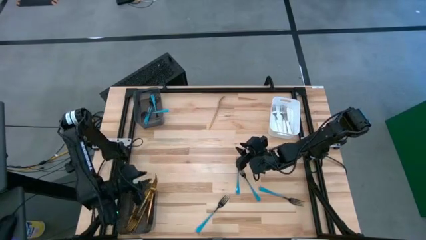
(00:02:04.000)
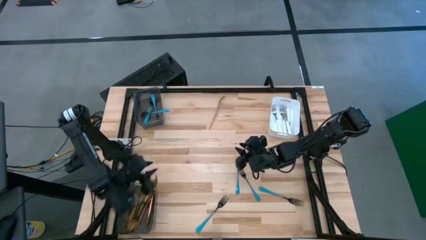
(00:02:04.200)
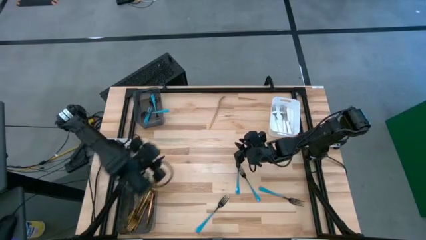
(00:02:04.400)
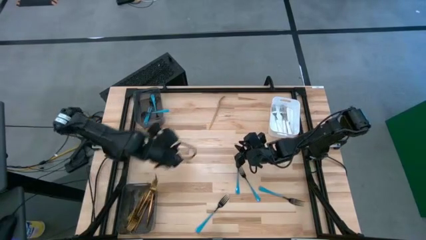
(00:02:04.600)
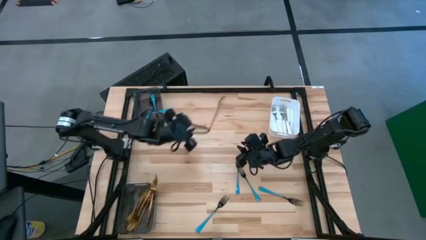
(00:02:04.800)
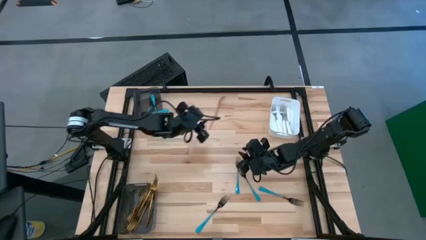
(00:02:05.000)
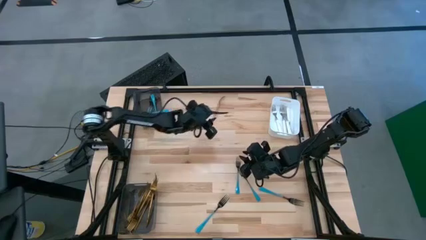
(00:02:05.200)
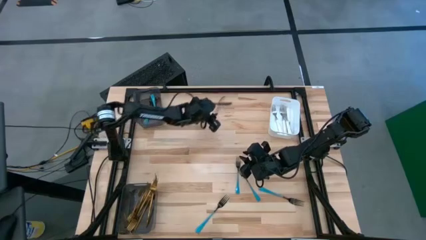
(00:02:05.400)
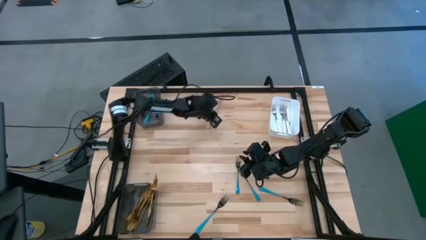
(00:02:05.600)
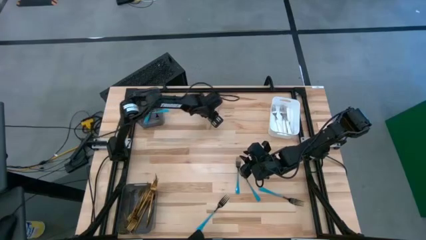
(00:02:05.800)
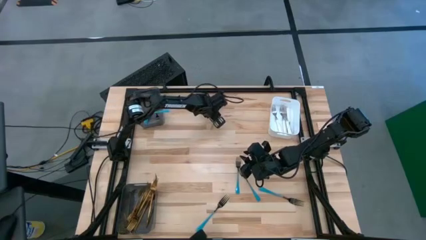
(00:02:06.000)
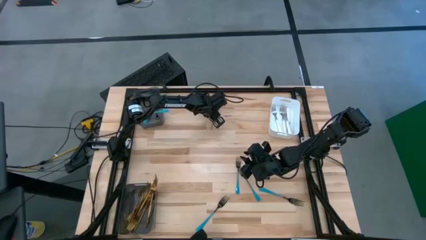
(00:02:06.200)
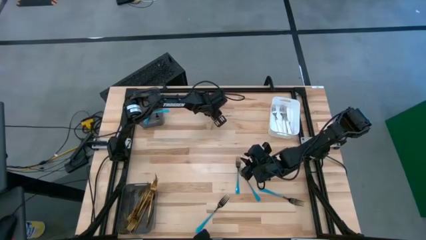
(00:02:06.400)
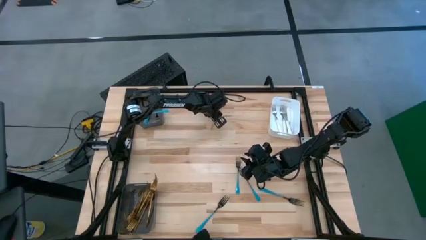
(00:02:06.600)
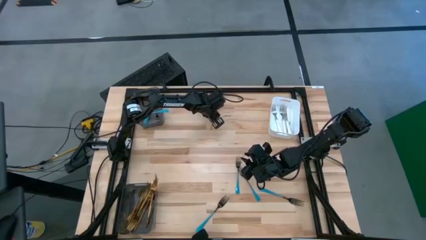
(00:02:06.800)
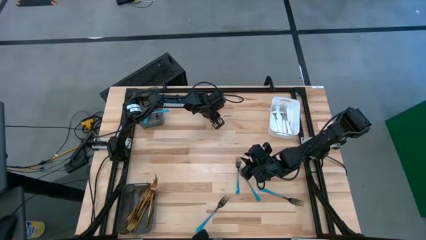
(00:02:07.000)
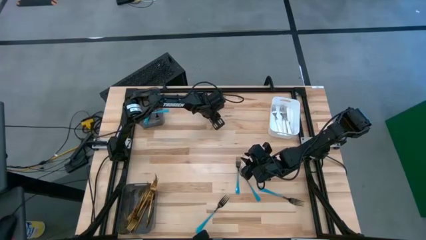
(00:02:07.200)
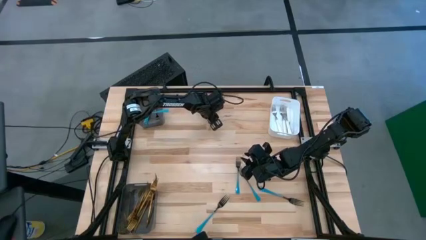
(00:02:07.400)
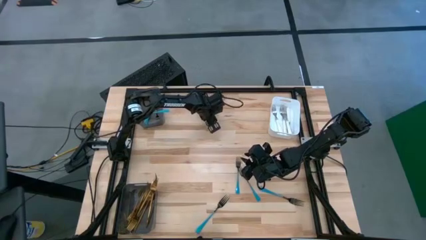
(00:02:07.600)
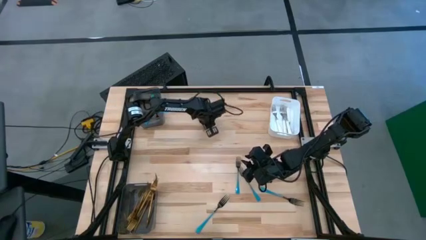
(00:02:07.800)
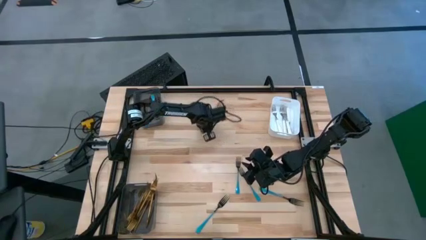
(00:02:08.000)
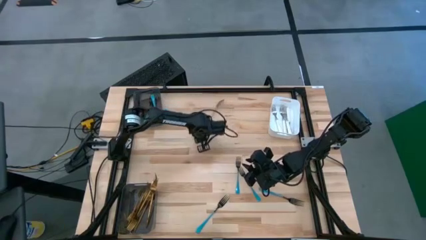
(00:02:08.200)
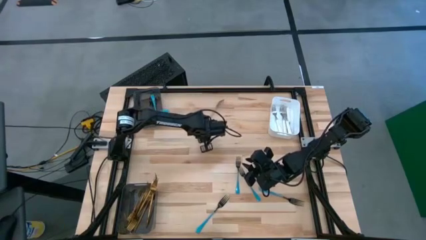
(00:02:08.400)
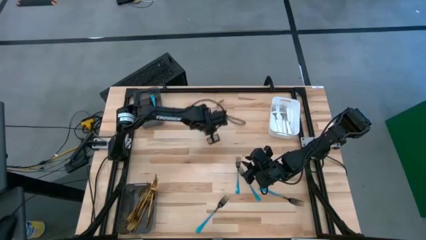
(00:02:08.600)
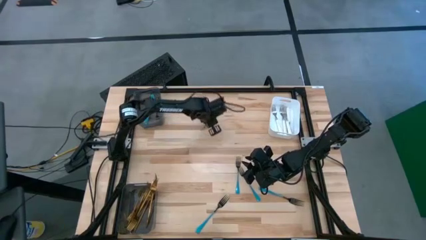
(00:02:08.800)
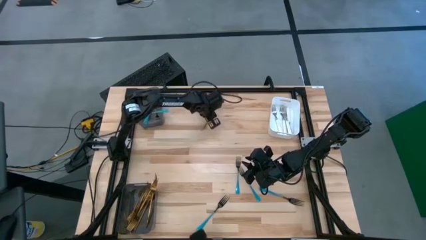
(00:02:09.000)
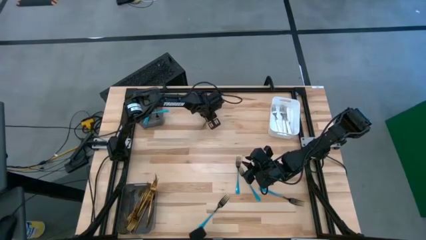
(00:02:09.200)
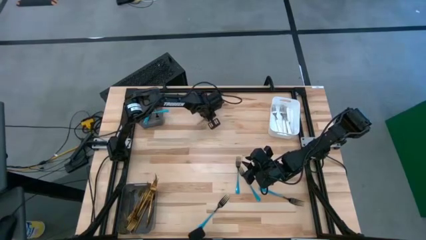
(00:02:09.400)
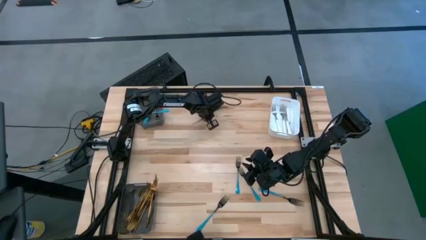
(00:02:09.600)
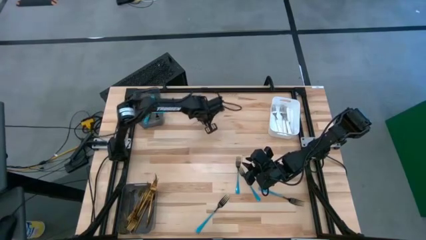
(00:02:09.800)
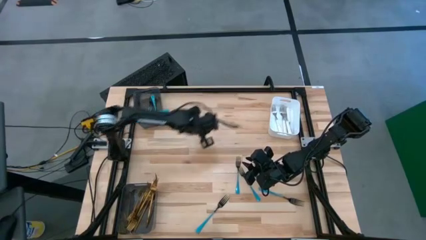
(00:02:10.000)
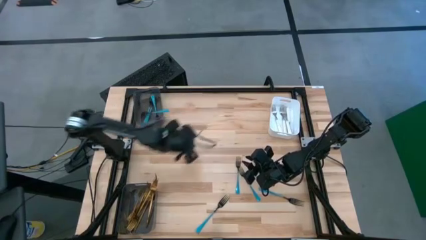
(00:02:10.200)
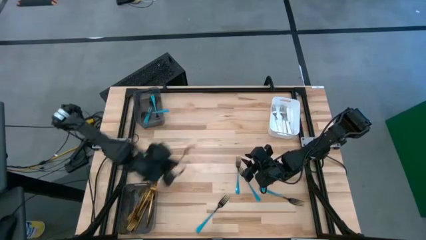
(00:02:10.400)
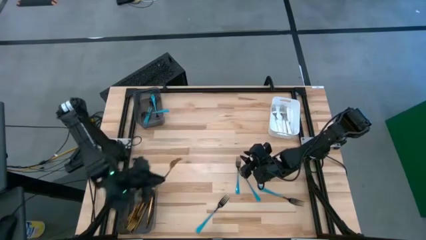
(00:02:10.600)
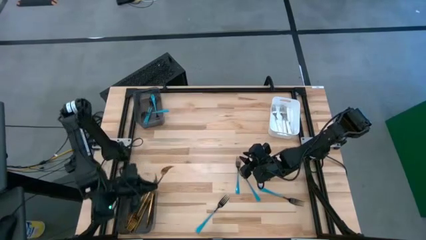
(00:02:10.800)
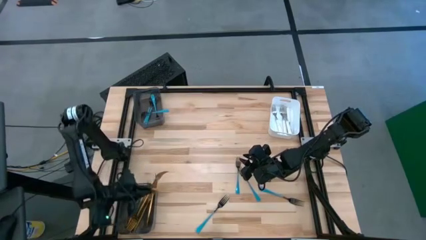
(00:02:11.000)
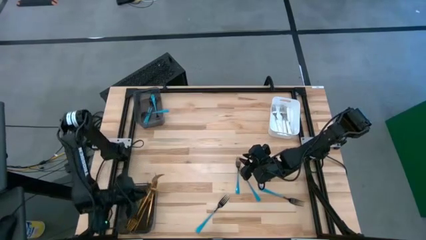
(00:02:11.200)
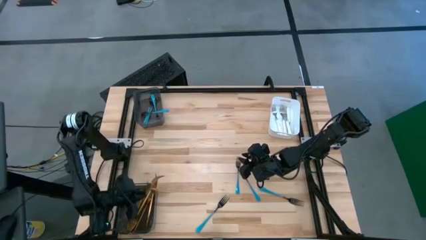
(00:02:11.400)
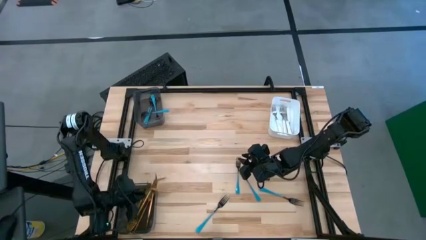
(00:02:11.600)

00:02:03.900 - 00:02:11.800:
Task: Sort silverware by color (type)
Put the gold fork into the bottom black bin

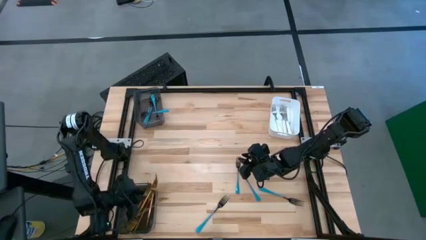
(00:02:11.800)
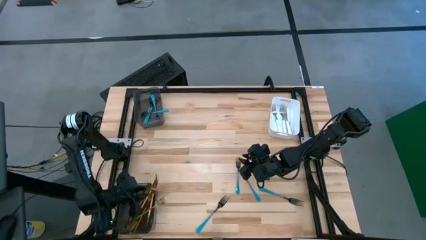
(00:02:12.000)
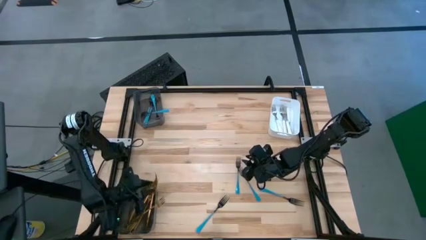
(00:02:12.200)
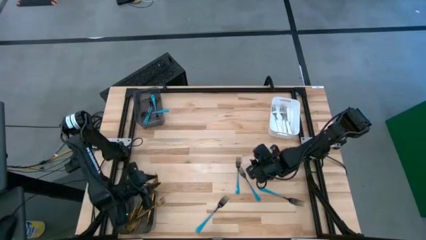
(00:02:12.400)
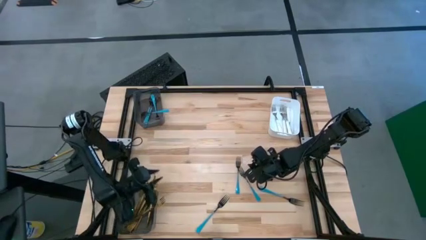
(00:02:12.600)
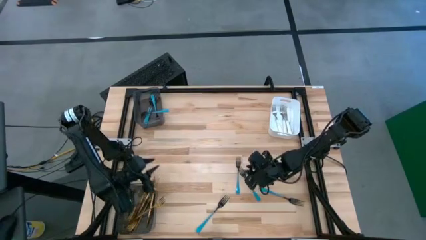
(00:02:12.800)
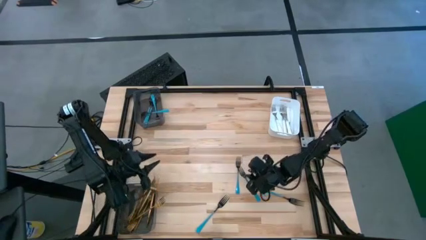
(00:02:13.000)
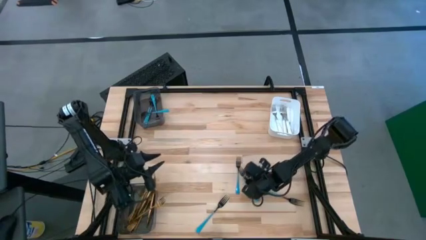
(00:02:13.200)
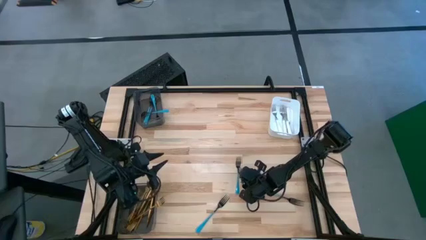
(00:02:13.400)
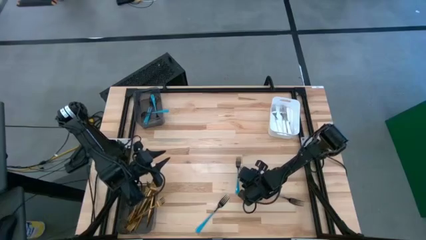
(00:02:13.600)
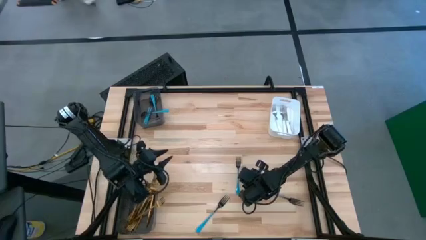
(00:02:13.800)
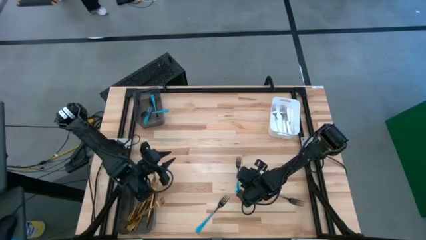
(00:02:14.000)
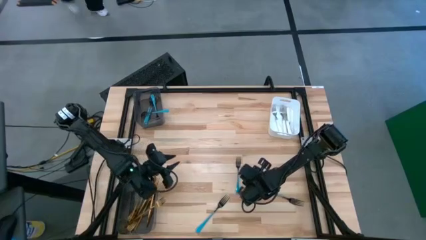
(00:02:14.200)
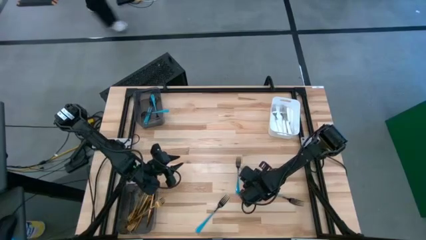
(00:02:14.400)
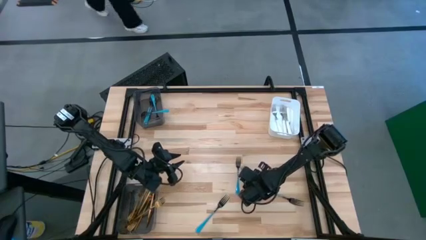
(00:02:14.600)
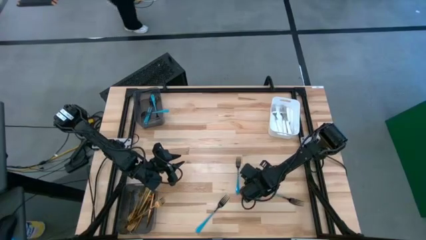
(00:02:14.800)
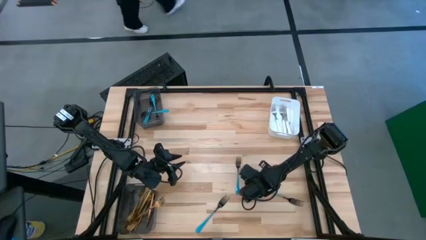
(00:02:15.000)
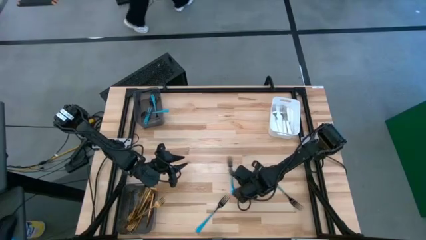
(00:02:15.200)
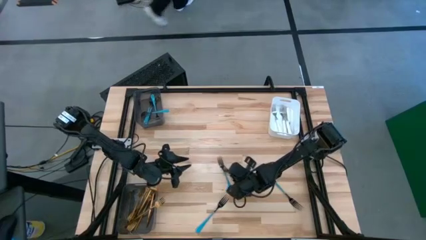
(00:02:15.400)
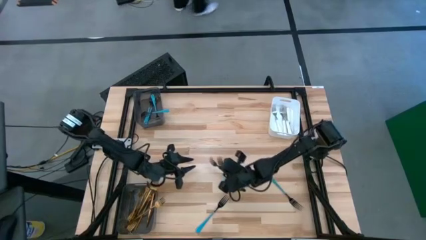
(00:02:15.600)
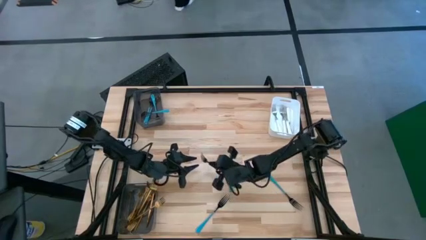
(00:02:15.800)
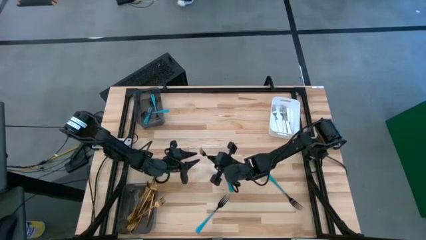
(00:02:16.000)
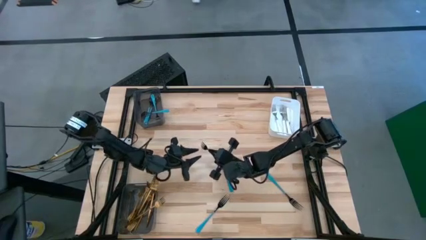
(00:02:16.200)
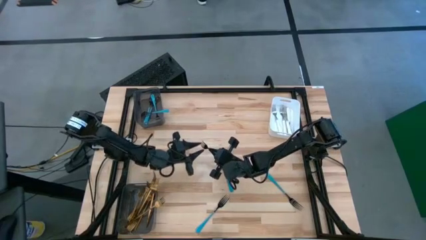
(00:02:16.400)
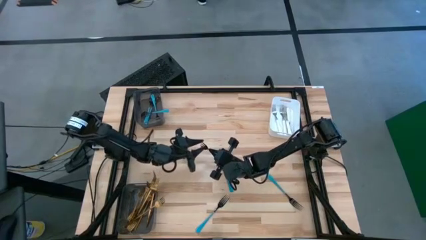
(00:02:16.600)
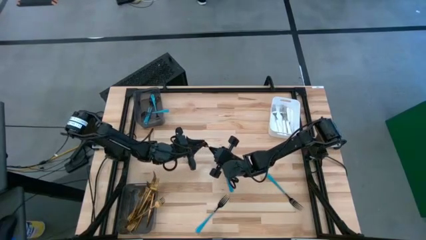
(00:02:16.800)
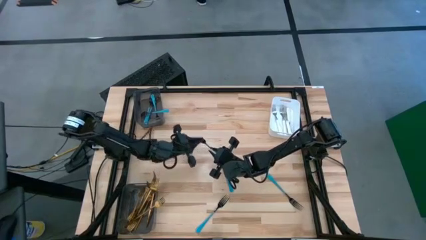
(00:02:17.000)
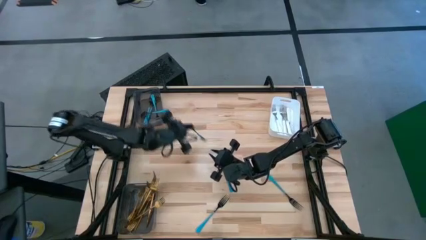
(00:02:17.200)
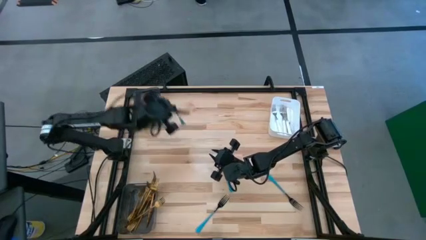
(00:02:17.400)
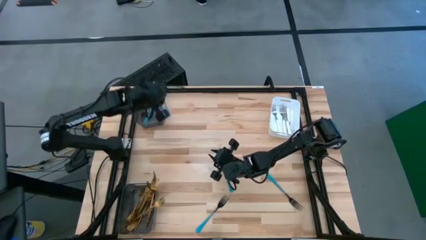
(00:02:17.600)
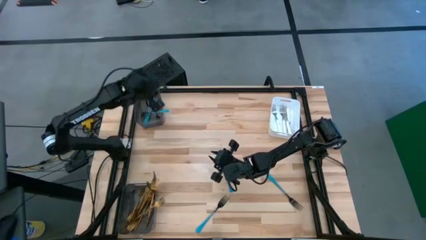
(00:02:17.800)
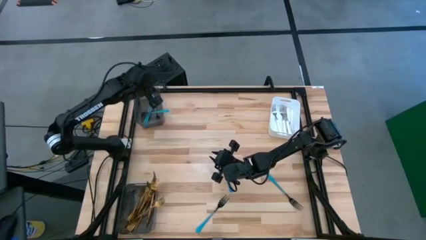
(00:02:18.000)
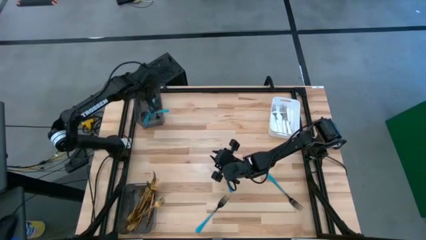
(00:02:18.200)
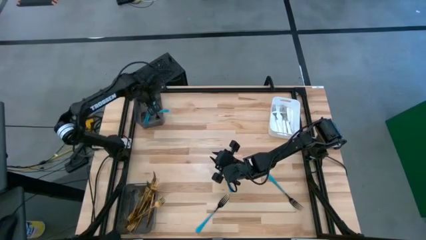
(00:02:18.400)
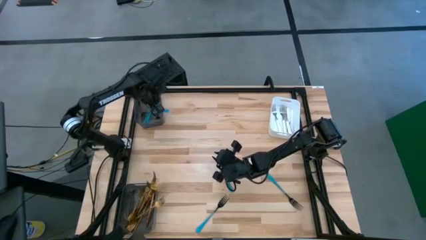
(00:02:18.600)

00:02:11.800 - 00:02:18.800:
Put the blue fork into the top black bin
